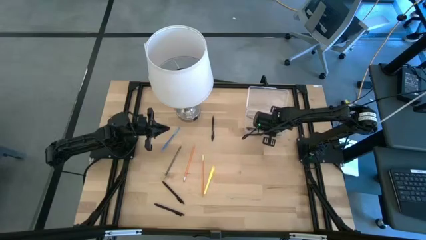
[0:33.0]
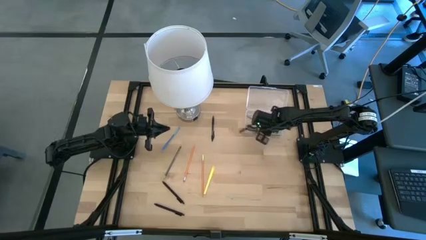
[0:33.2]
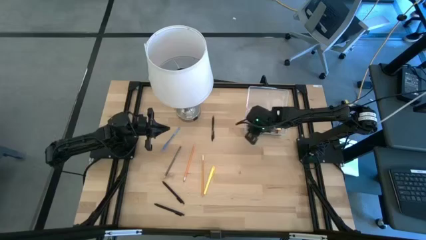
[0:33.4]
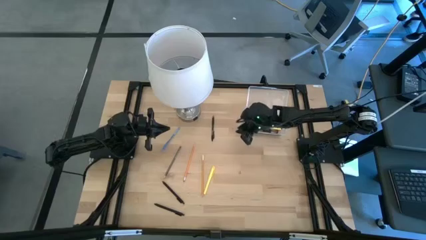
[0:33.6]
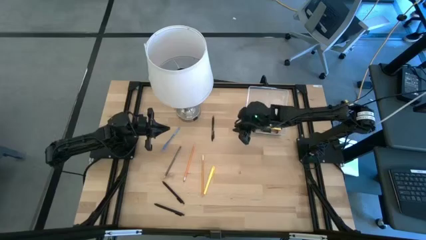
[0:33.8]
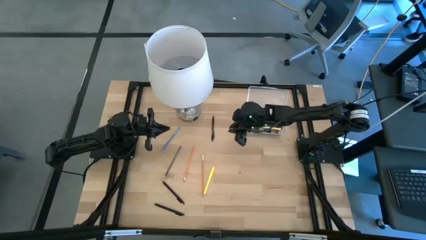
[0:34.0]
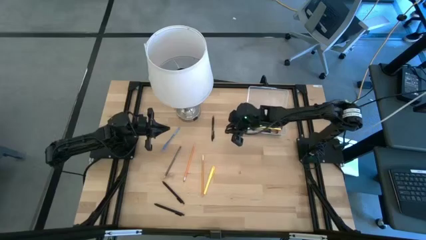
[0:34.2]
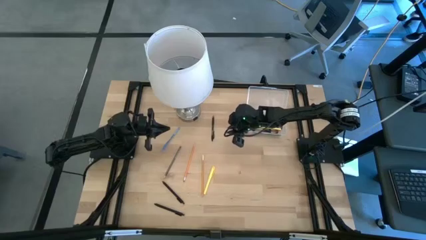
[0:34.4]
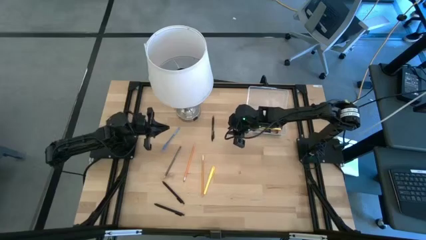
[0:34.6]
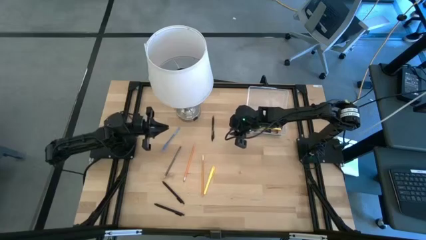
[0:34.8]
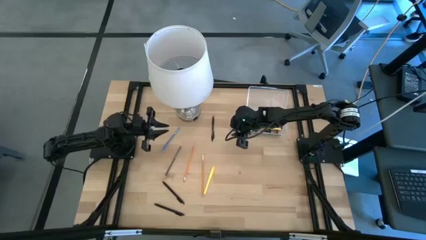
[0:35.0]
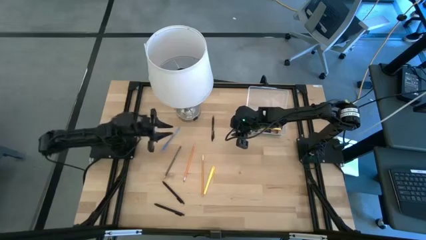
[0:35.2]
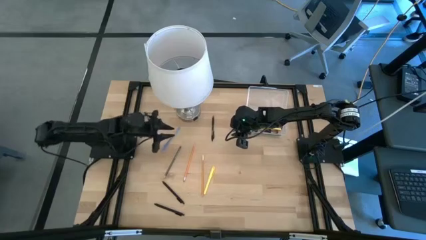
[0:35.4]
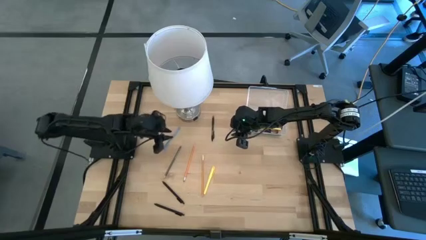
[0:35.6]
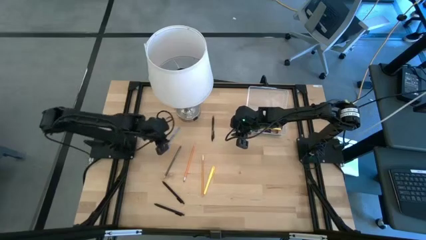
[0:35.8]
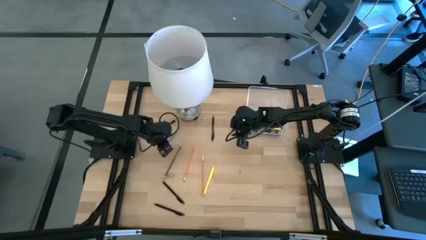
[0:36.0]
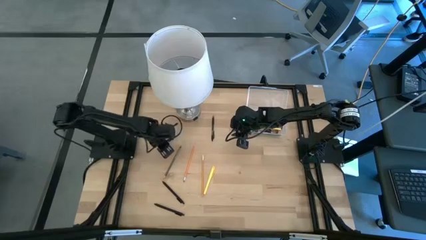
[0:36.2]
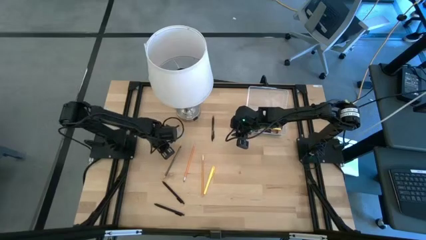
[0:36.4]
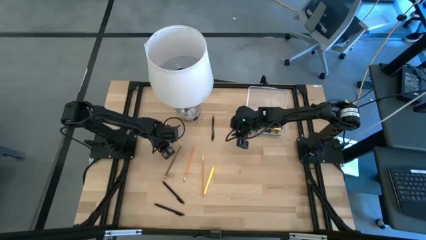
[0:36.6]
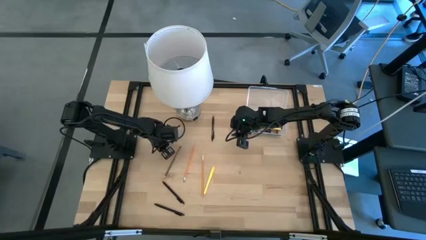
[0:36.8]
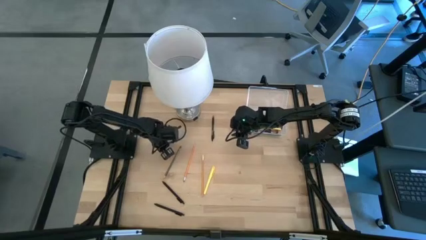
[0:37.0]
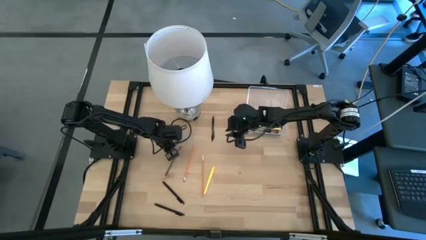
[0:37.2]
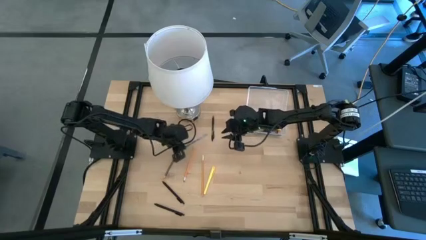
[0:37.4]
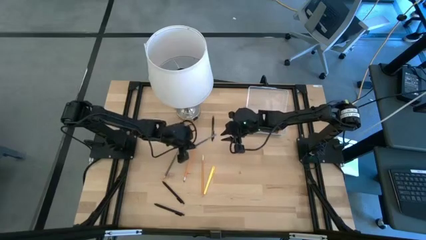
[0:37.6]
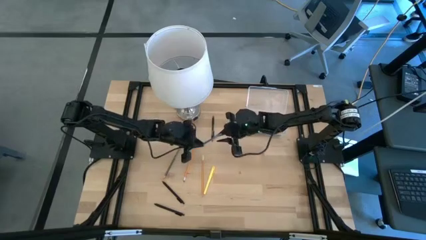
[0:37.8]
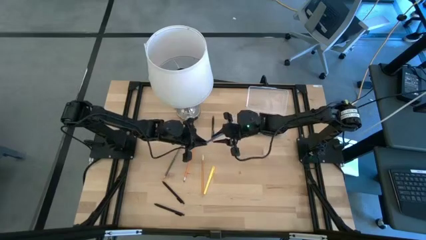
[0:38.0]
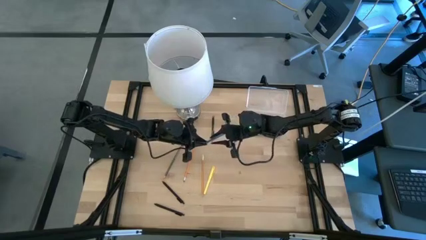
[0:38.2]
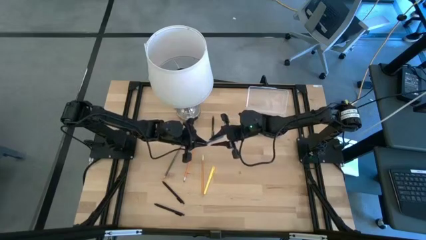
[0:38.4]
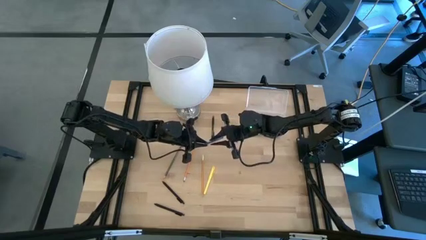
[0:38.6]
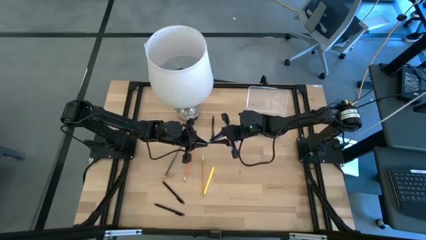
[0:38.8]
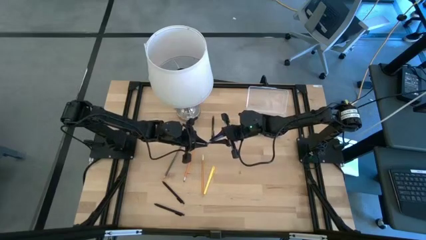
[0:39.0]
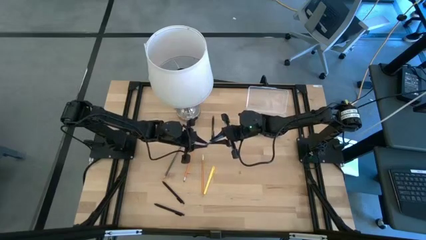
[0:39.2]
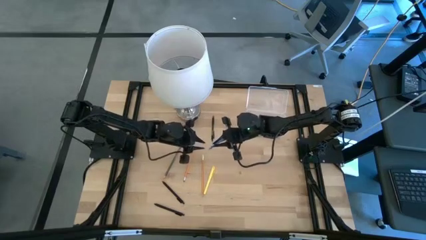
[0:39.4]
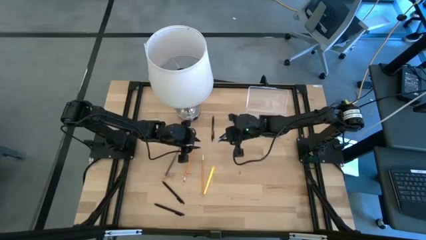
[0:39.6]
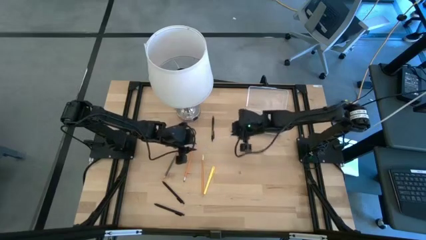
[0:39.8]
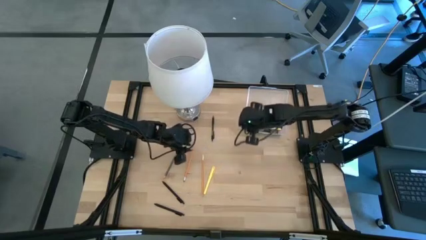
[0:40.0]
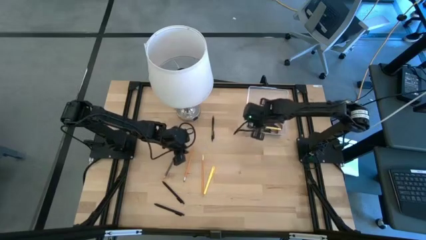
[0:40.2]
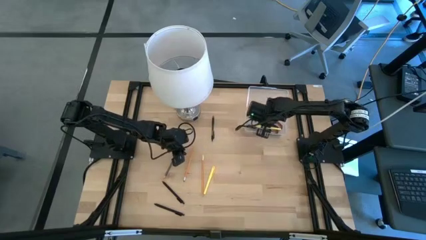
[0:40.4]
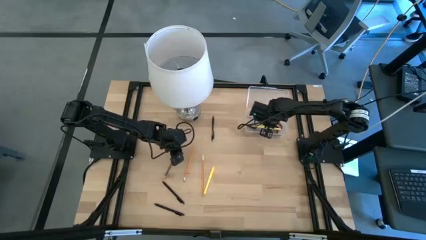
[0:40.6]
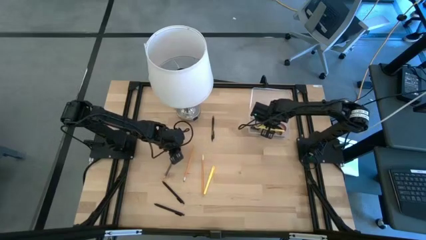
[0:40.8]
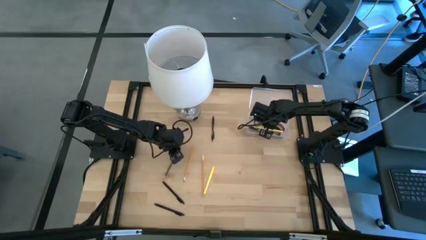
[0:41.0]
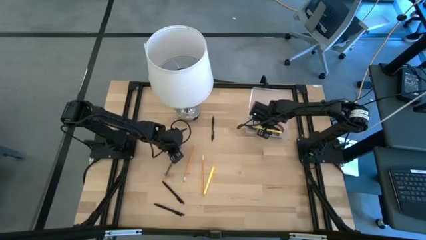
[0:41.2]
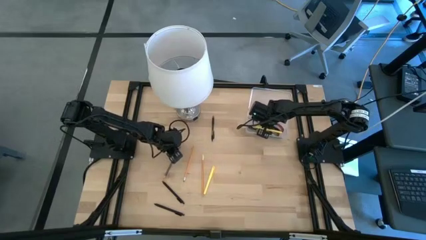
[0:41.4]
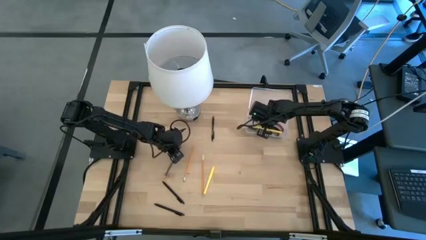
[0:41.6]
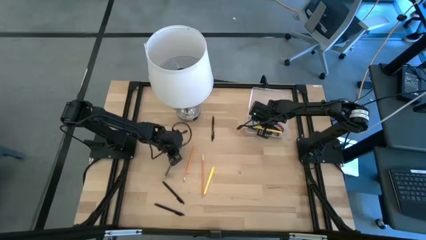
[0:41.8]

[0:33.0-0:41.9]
Task: Pick & place school supplies into a supply box
Put the blue pen into the transparent supply box

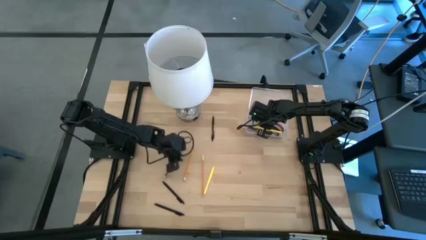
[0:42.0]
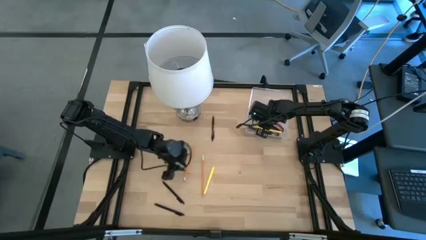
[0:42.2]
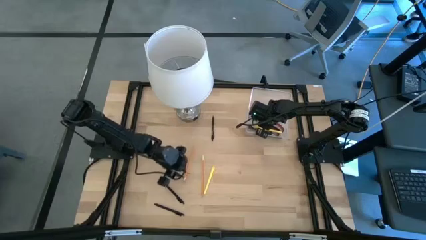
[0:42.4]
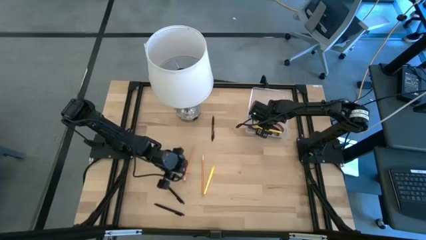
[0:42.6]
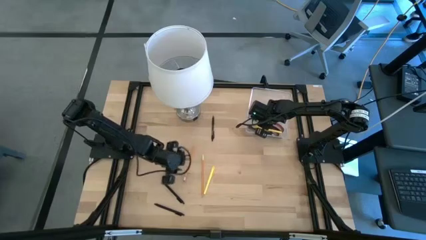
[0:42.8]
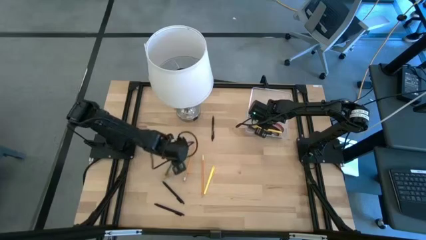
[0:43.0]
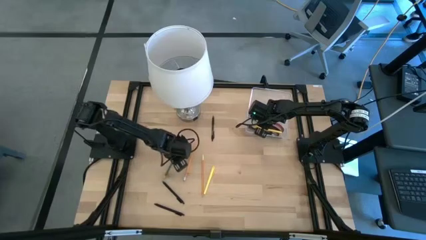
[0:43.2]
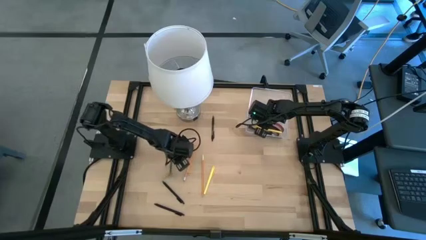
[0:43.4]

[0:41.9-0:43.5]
Put the black pencil into the transparent supply box

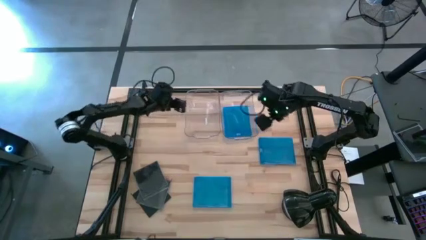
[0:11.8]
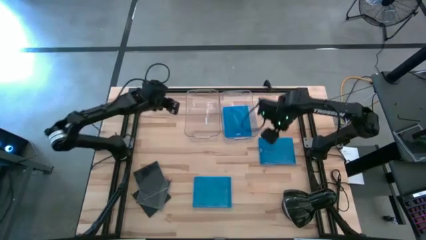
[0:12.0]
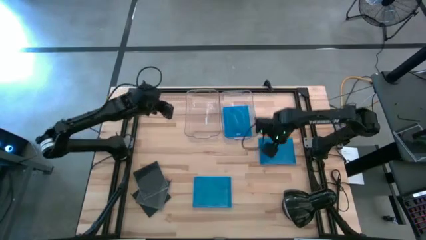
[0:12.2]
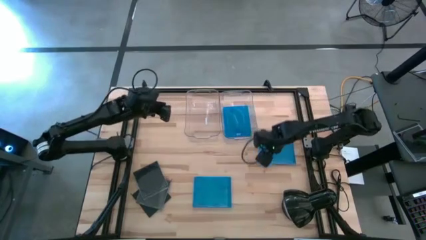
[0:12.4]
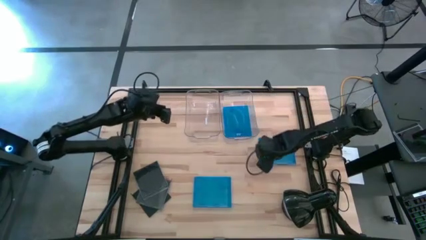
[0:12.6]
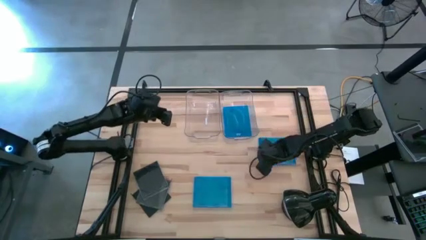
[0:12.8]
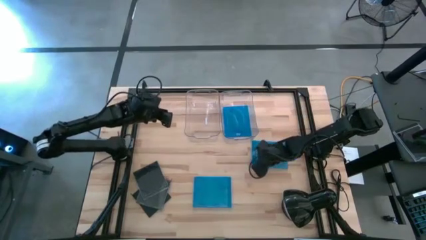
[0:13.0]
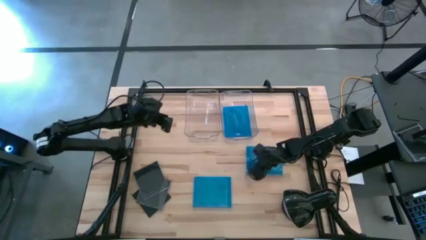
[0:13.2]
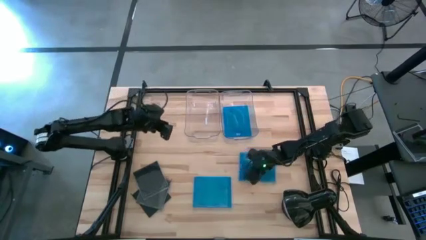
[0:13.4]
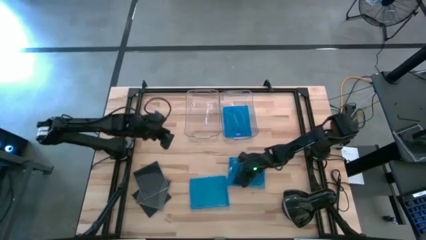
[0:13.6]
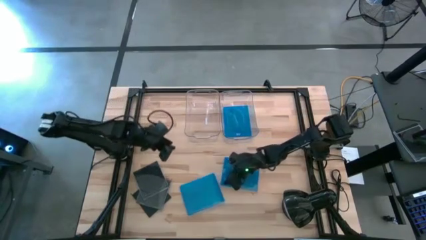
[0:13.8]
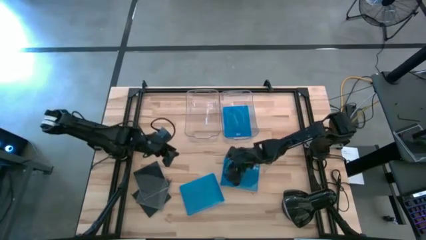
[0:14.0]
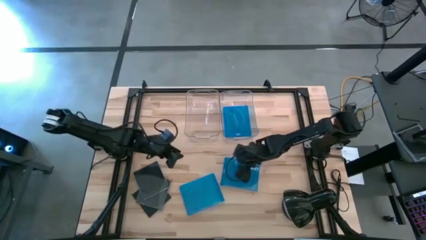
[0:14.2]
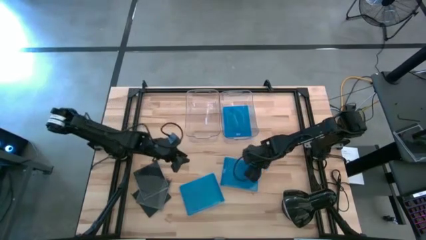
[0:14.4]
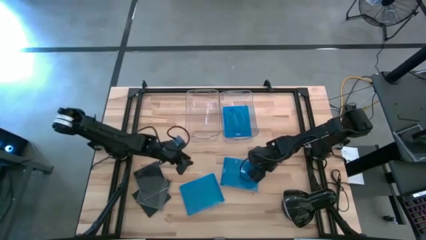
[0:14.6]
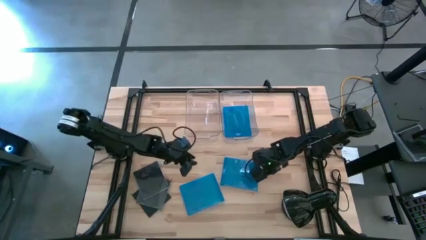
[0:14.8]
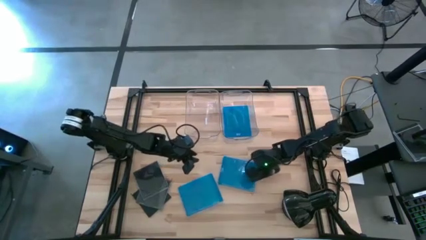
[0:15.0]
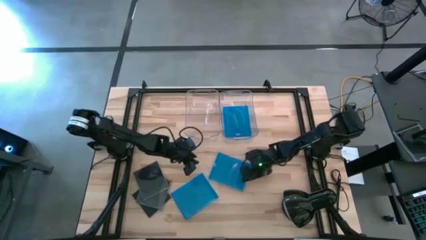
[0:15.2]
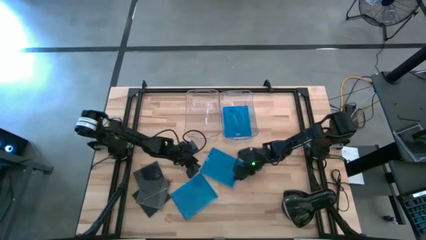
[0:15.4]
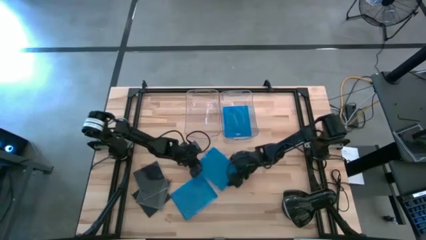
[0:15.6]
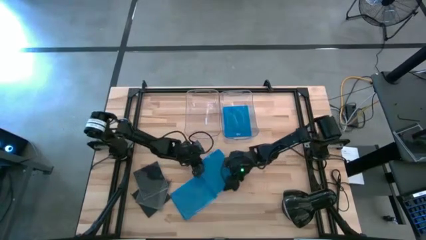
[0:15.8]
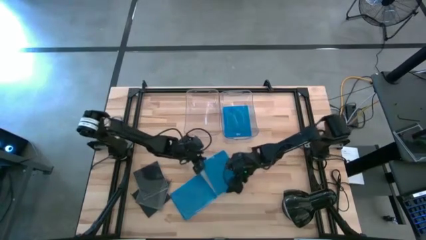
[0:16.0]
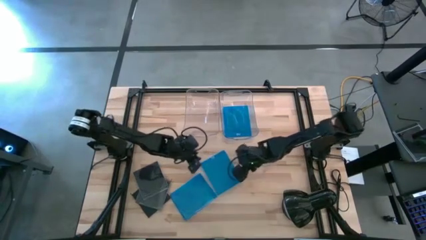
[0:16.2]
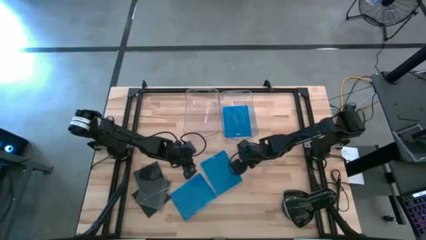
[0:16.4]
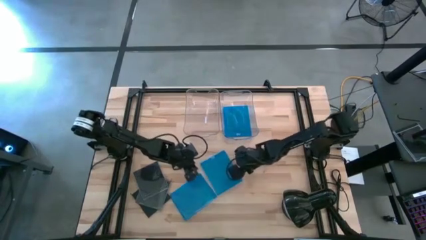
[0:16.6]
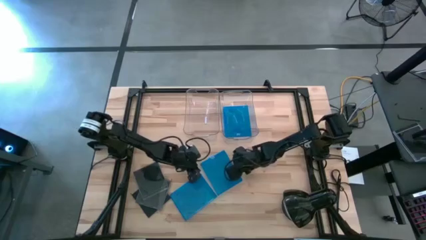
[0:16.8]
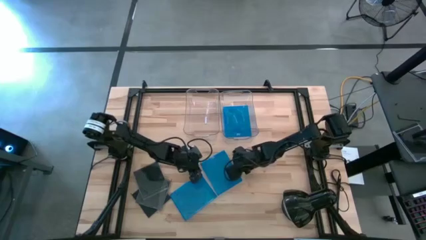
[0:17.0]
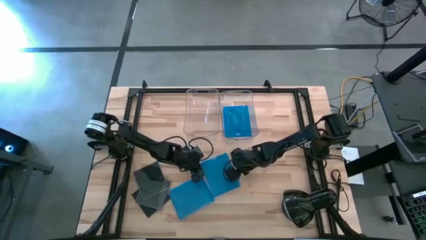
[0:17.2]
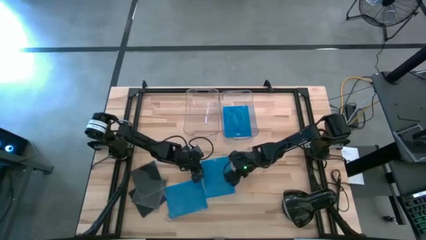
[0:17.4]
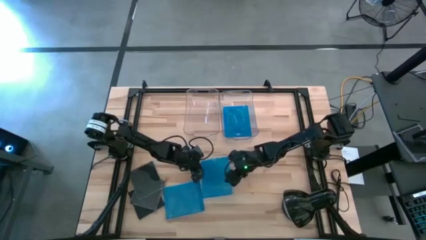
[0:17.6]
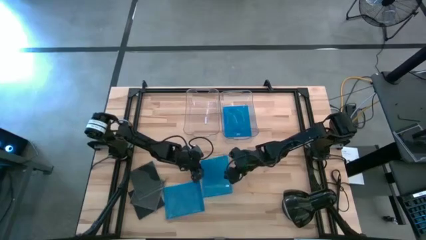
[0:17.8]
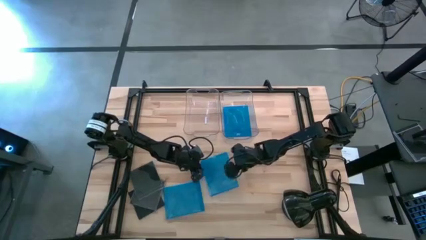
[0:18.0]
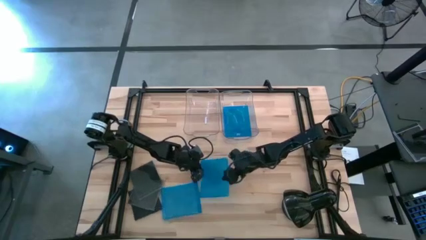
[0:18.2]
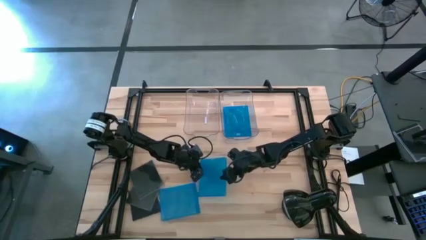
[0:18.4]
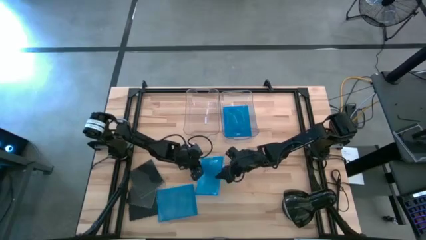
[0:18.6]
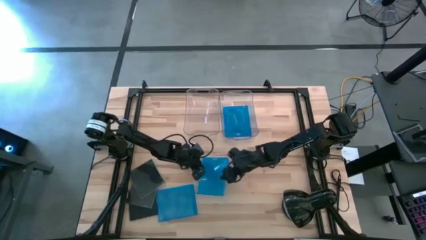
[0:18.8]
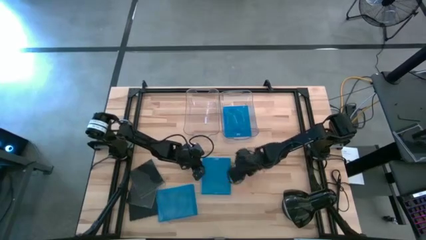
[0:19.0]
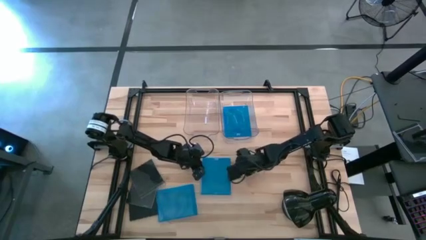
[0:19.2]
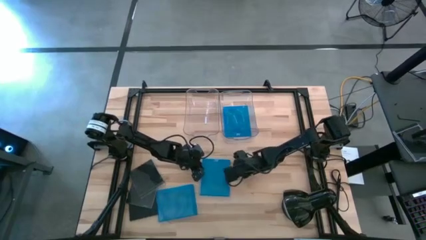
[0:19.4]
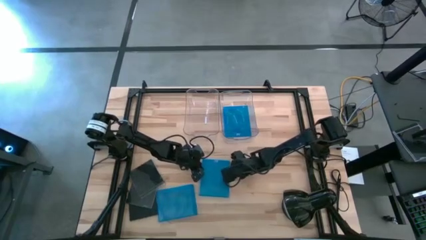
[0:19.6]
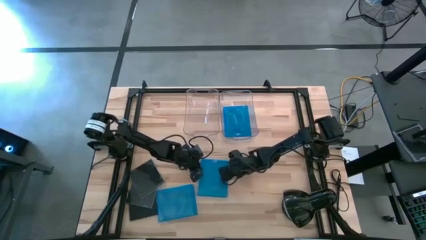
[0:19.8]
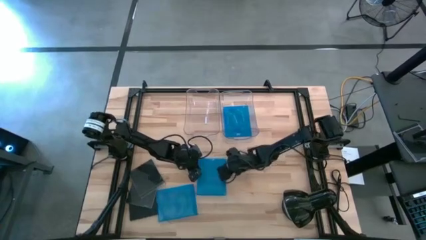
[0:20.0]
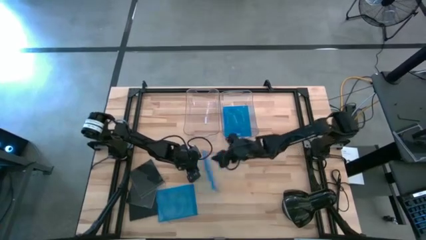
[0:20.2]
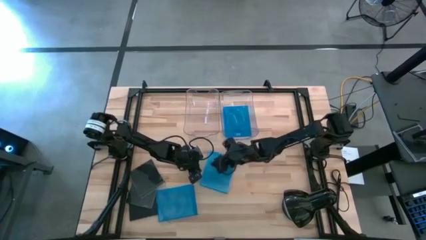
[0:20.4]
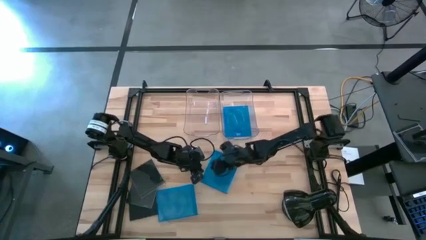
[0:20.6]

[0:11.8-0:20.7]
Task: Pick & place jewel cases by type
Put the right blue CD case into the right transparent bin
